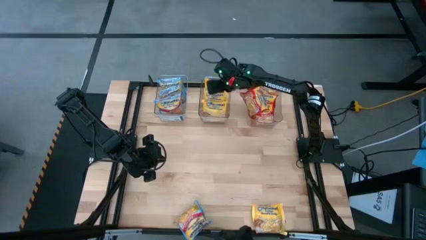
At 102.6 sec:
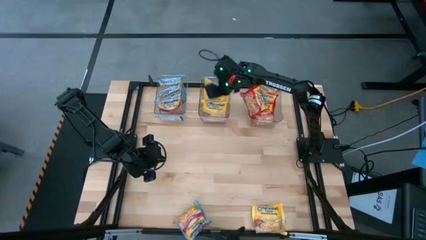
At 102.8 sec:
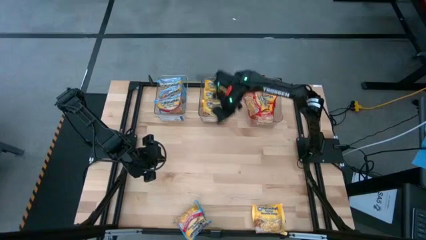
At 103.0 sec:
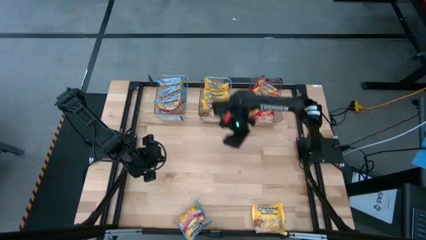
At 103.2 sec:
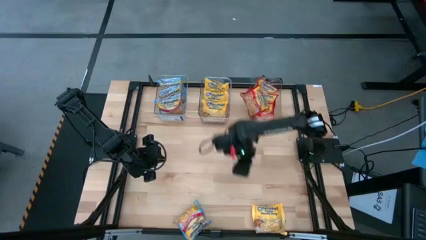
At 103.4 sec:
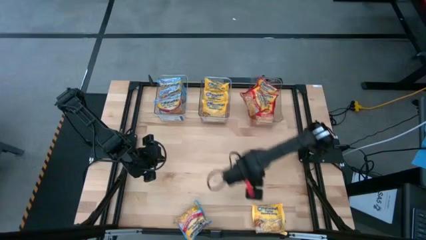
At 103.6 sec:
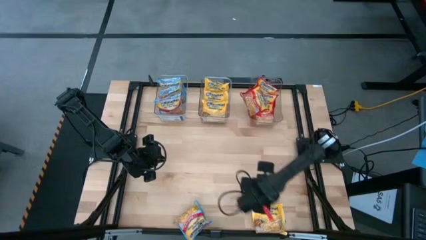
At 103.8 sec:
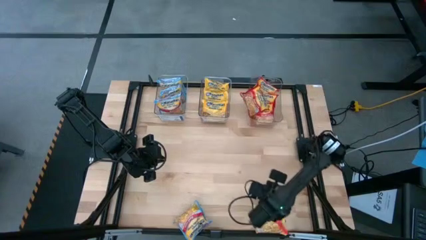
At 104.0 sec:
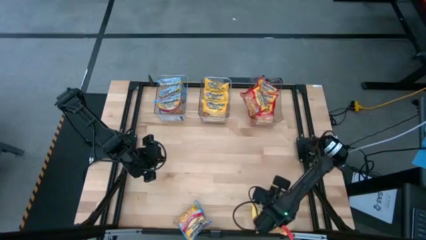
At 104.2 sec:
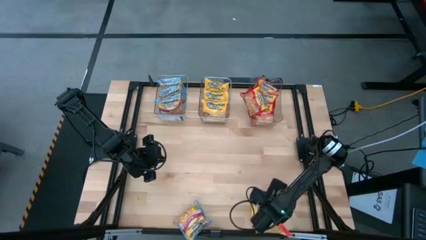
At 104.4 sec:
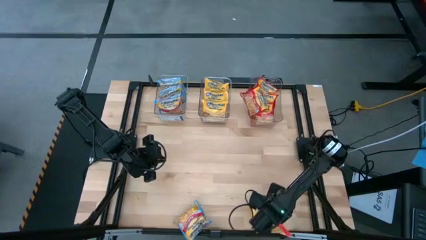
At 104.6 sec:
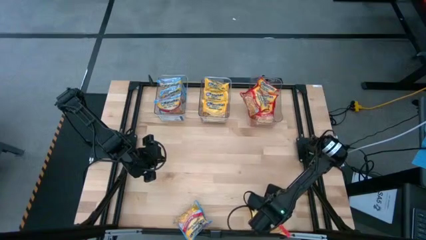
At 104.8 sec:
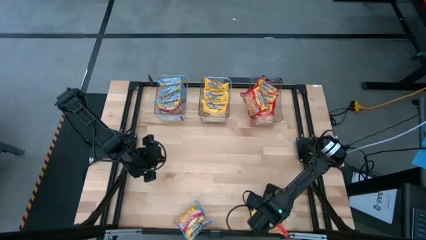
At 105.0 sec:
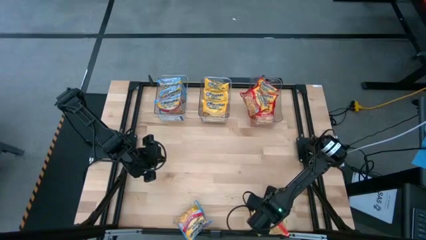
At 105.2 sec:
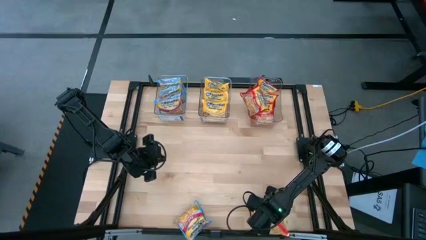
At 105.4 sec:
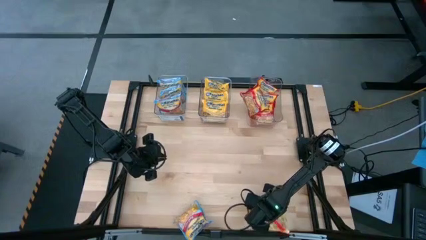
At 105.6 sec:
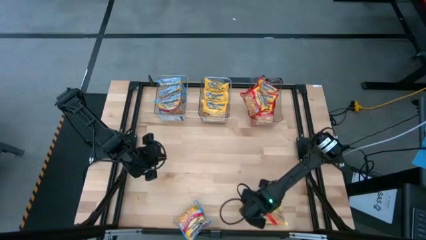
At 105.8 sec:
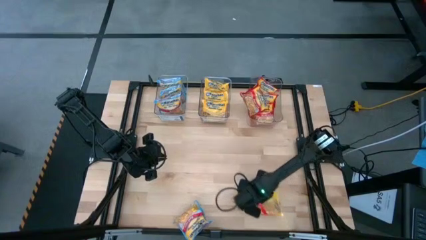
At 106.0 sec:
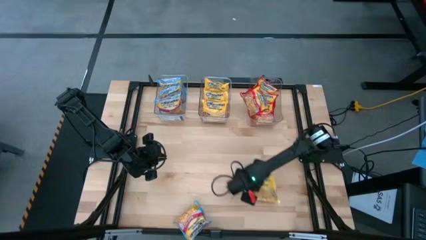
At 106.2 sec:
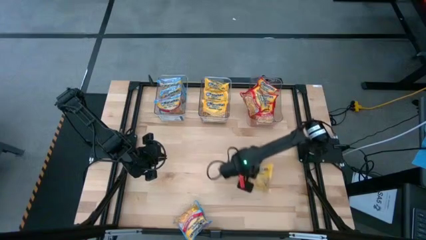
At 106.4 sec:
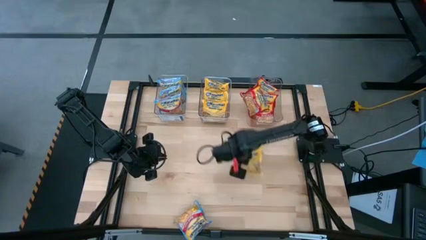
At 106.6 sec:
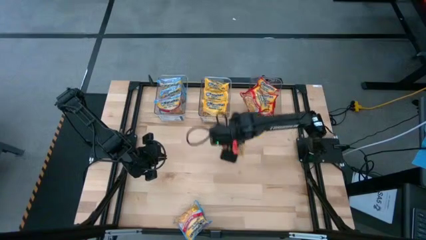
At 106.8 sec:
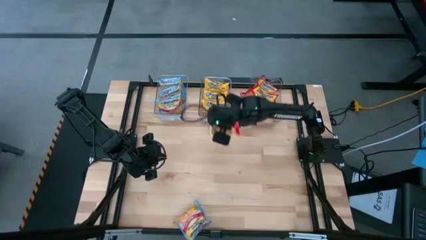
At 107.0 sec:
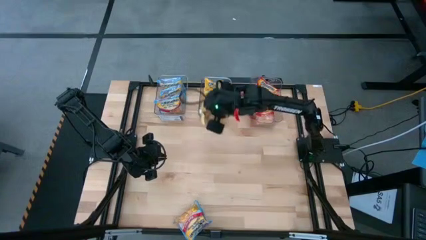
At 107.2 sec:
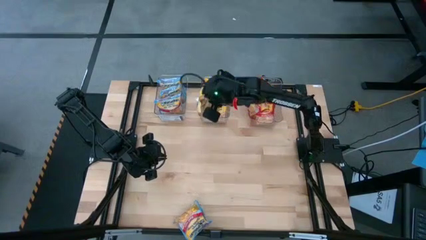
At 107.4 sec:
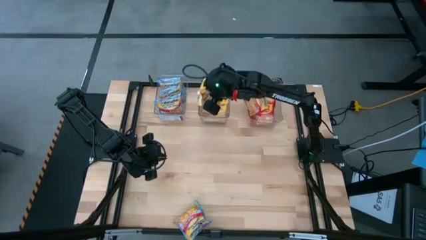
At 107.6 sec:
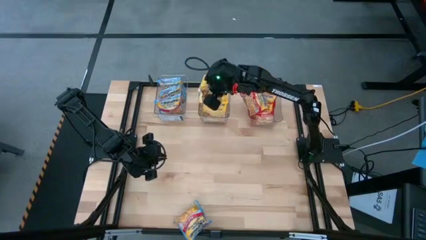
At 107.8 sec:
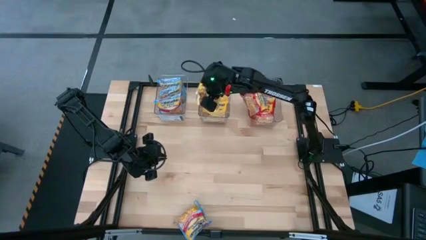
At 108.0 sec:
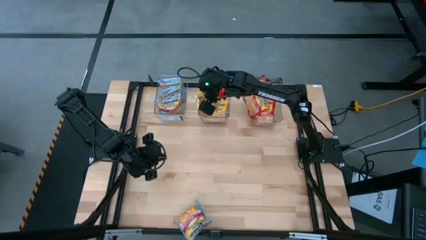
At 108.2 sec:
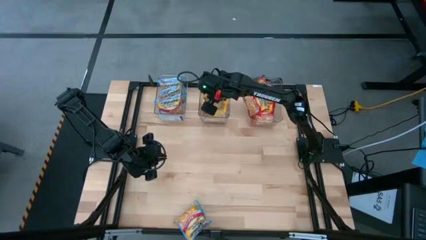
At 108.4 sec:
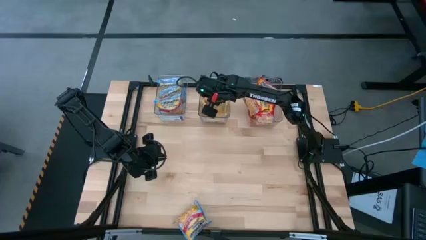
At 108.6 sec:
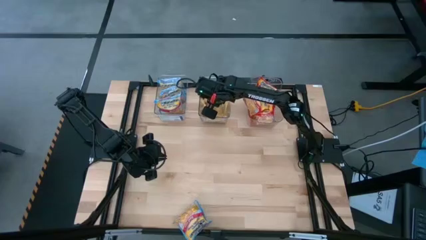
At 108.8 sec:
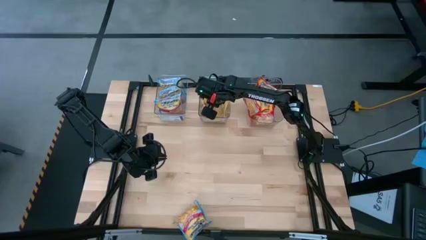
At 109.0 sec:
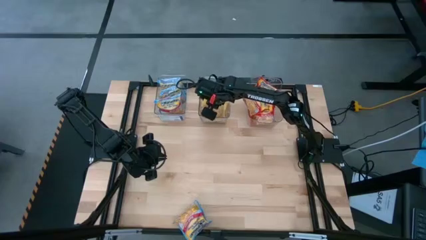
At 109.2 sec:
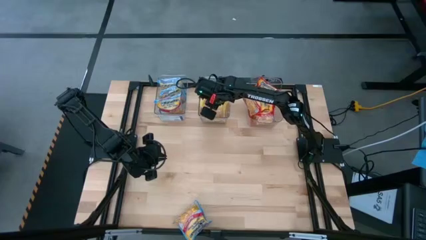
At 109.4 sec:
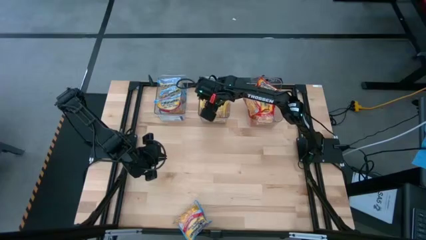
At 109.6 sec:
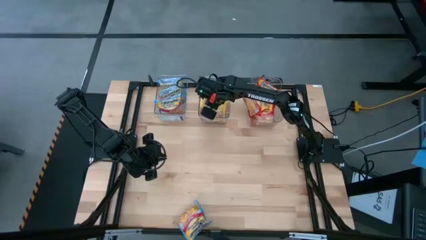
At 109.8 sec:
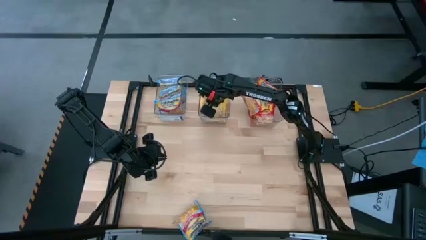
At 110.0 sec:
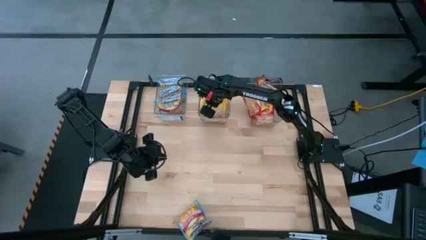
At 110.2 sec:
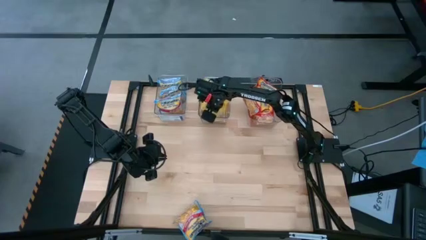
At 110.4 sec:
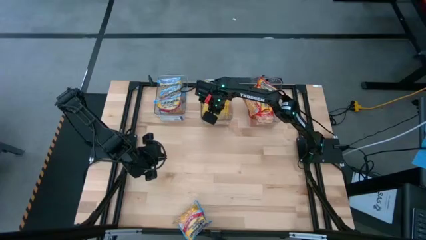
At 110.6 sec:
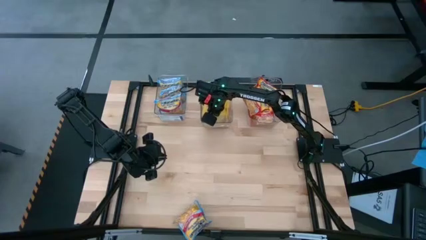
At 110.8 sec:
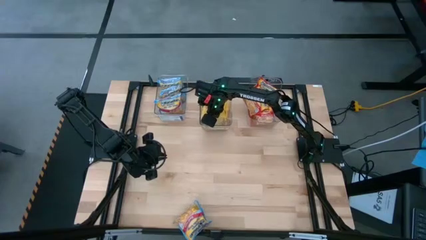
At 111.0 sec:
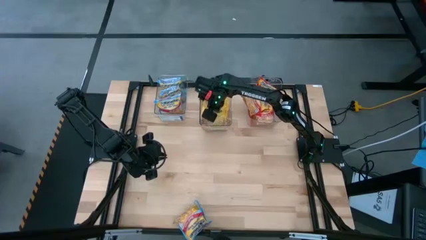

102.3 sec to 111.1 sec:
Task: Sort Maruchan noodles
Put the yellow noodle pack into the middle transparent bin

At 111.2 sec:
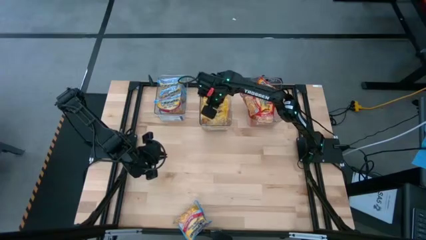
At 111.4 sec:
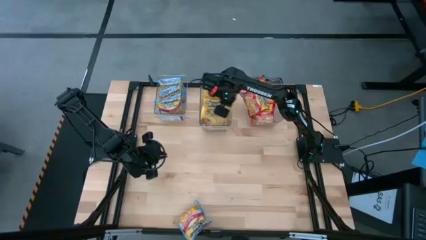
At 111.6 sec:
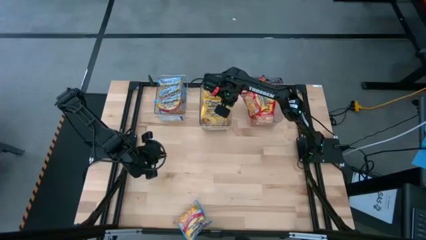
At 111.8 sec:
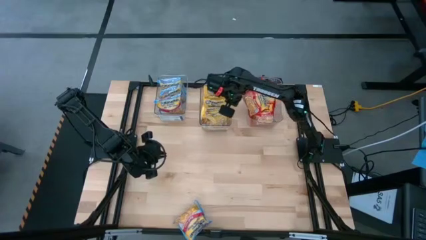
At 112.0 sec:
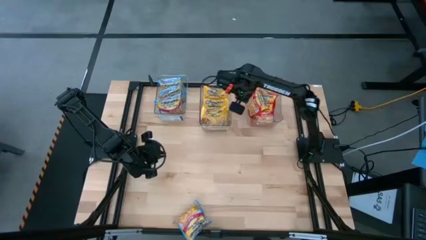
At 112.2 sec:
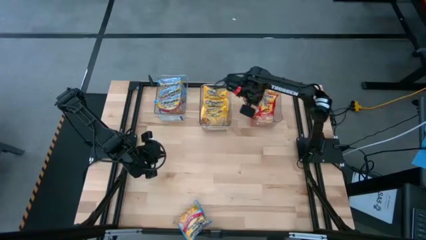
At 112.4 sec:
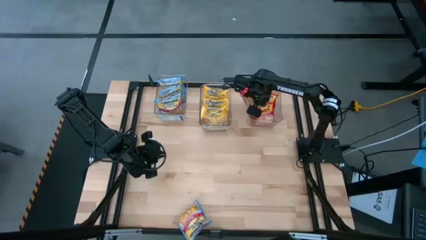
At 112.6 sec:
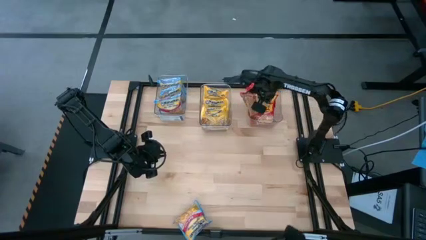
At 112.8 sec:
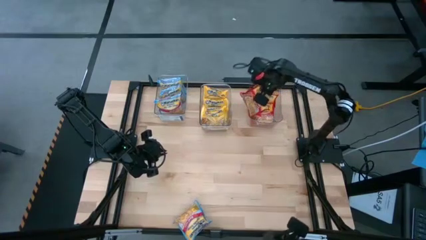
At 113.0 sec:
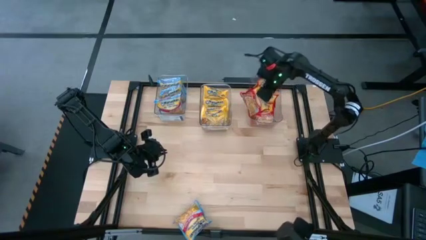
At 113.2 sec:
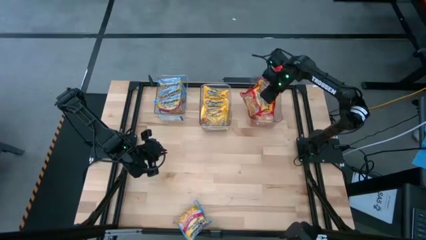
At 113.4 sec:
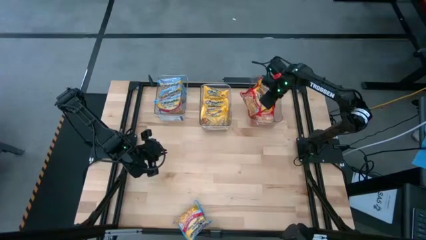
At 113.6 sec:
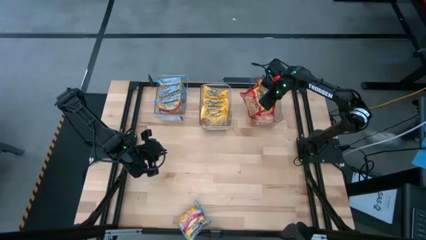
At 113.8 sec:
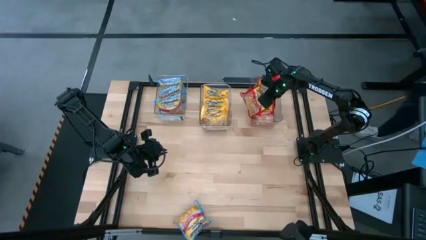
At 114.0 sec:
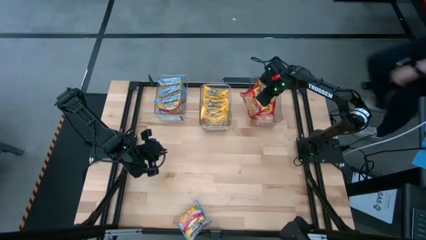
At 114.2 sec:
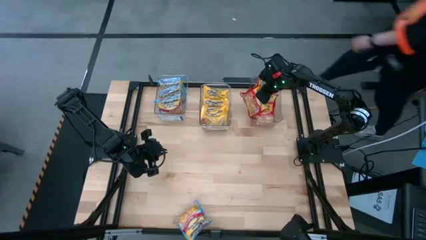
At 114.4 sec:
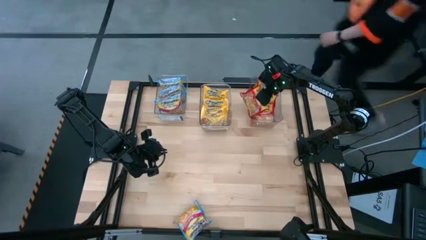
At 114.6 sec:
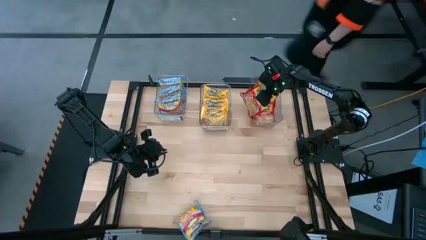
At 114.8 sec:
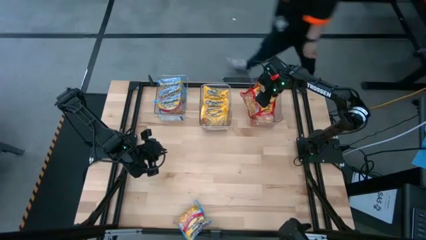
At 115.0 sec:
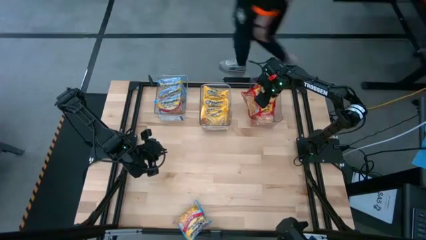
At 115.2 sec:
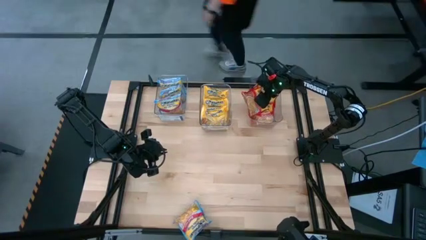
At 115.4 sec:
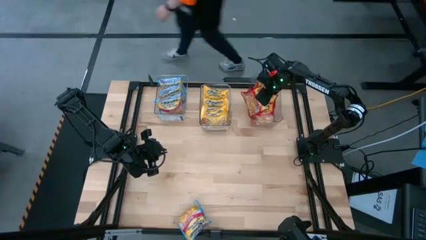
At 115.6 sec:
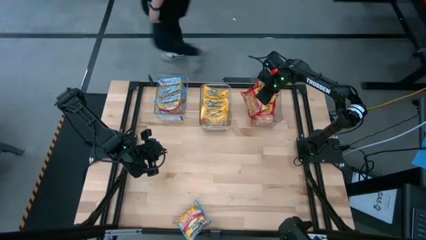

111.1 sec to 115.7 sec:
Adjust the red noodle packs on the right transparent bin

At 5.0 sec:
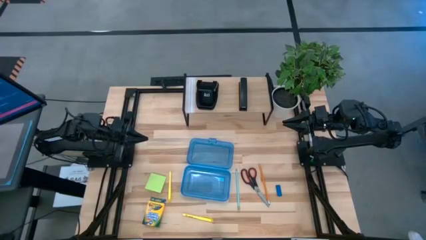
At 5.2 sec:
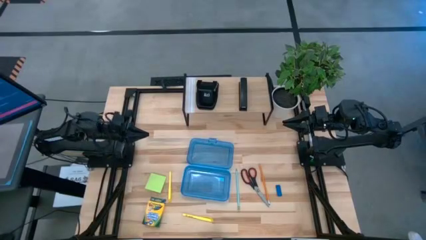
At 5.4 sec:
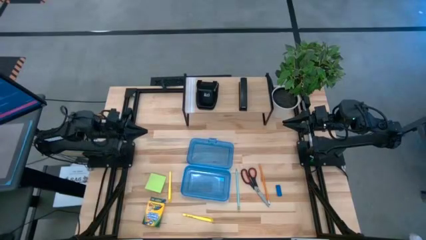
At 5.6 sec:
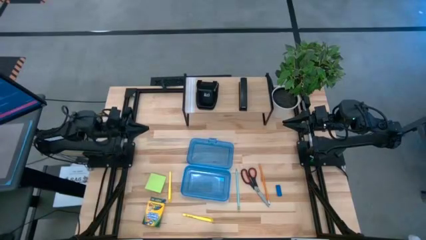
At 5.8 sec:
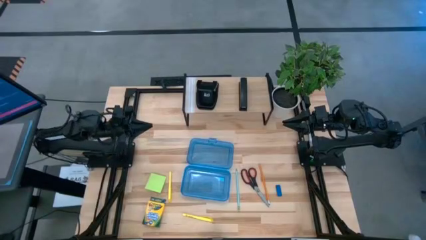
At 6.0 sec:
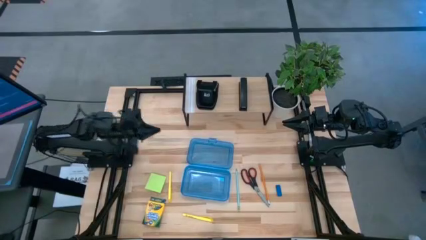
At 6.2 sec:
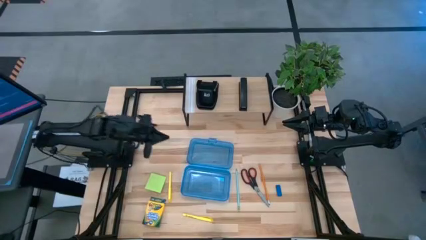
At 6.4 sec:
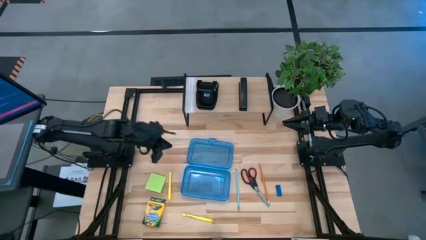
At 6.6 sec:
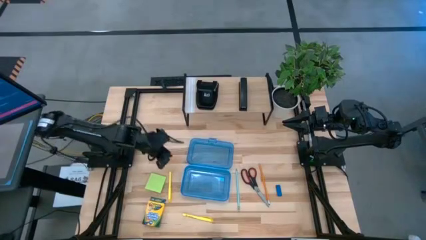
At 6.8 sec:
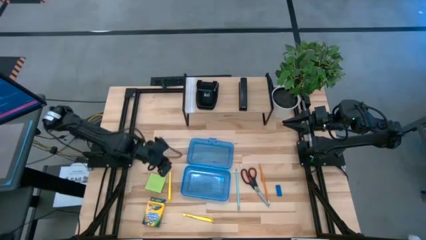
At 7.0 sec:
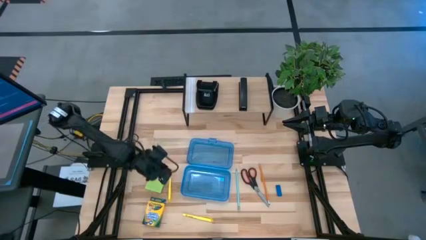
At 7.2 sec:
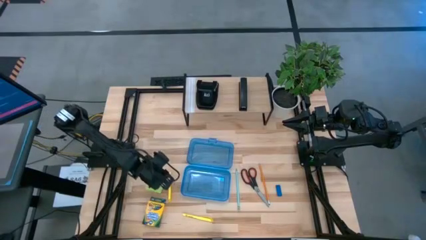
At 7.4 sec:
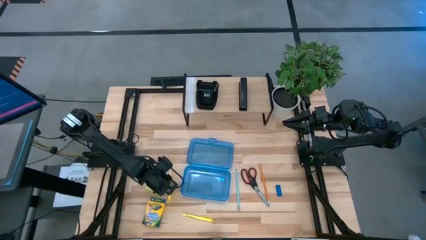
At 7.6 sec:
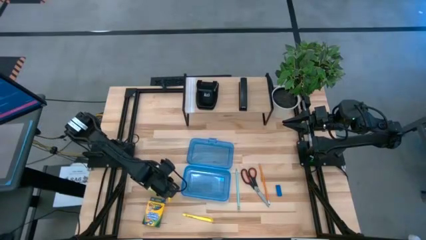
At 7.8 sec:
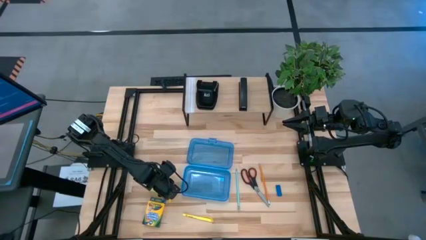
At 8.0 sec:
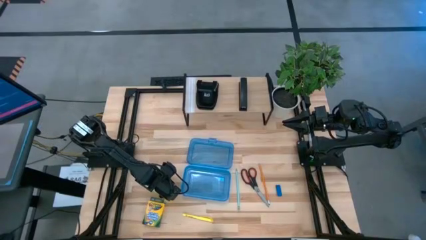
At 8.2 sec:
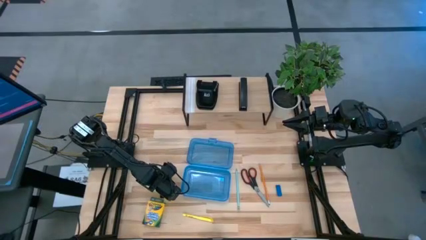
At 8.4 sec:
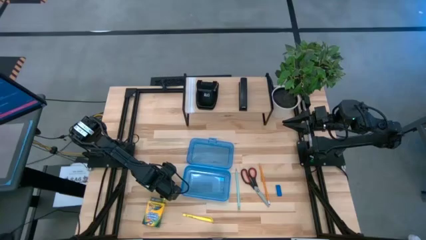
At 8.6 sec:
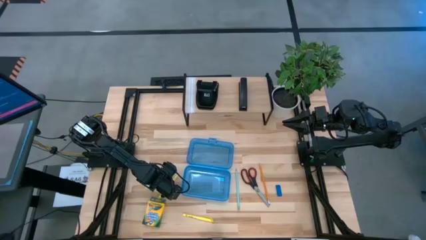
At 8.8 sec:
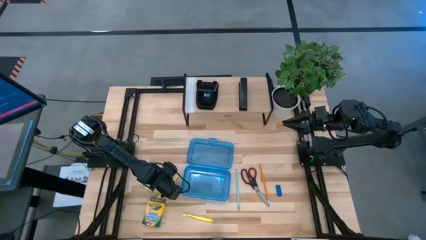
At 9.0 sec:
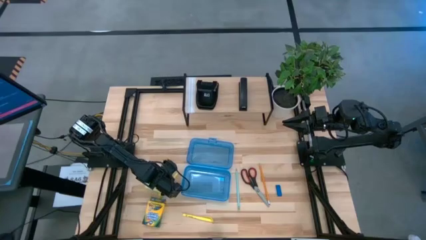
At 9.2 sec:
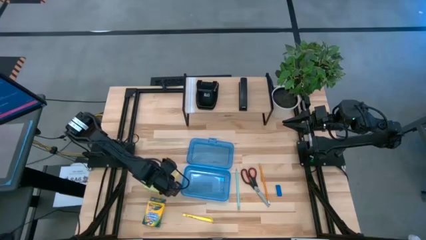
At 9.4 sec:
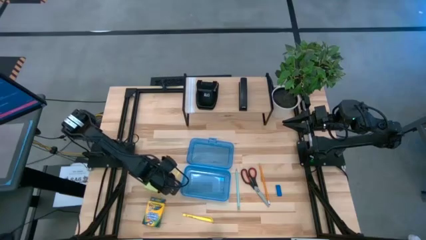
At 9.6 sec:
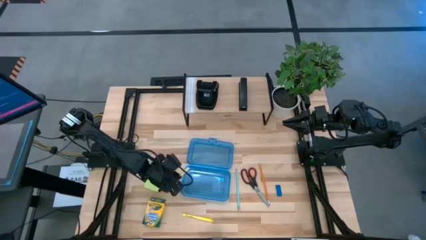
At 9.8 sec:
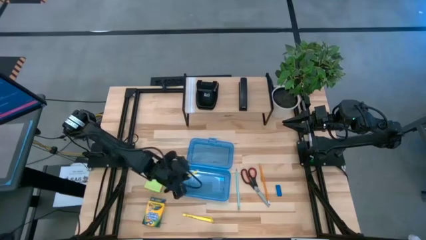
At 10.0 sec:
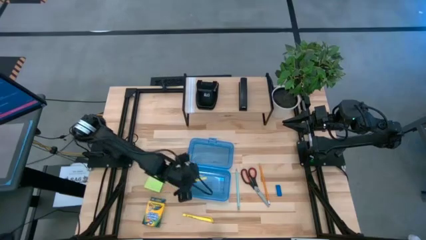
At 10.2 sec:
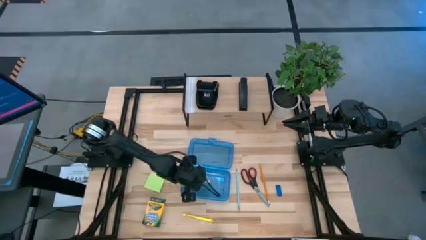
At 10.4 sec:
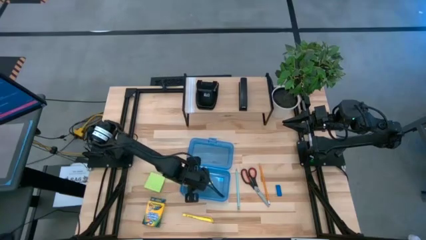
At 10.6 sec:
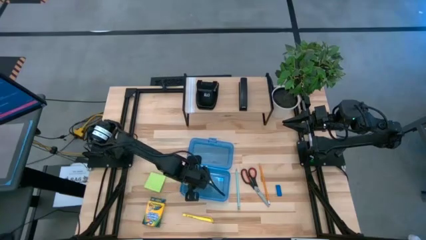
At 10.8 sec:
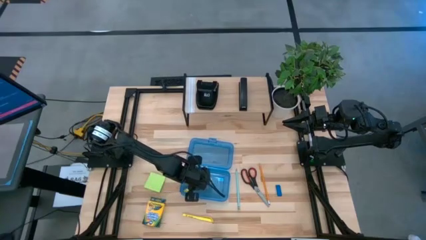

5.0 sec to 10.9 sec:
Task: Pack school essentials
Put the yellow pen into the blue supply box
